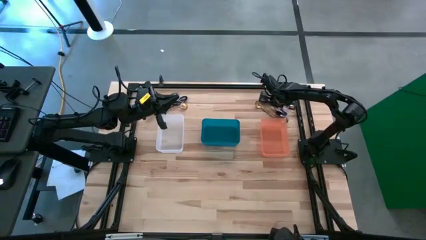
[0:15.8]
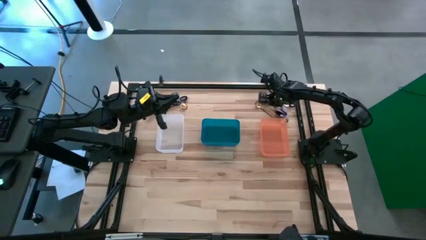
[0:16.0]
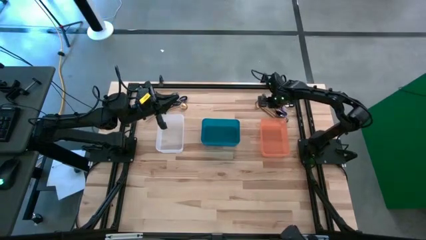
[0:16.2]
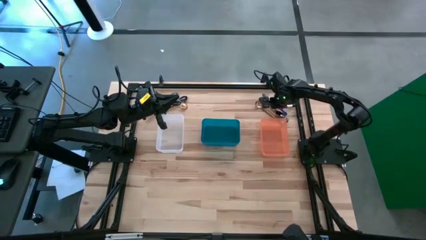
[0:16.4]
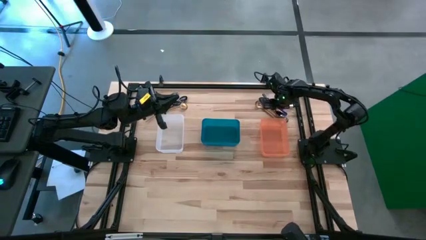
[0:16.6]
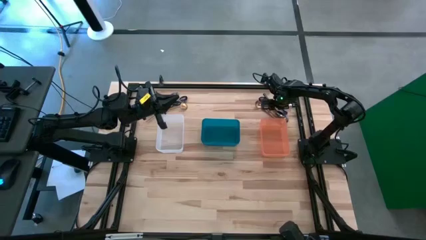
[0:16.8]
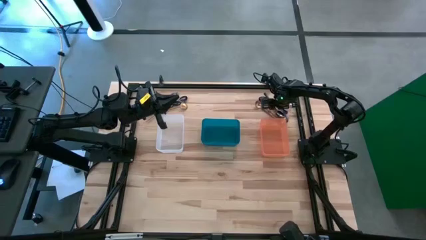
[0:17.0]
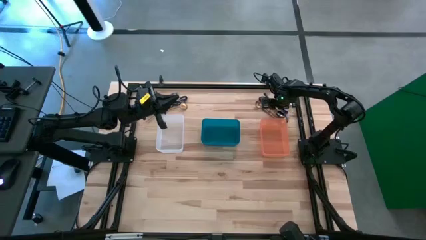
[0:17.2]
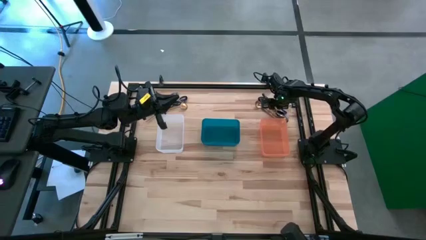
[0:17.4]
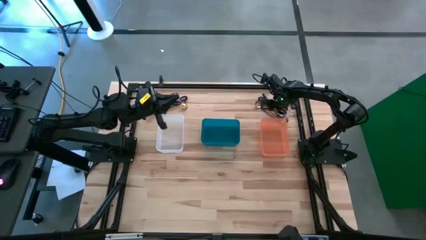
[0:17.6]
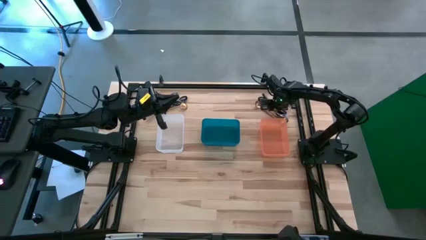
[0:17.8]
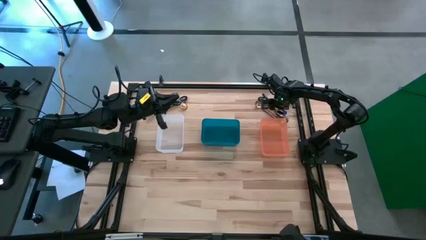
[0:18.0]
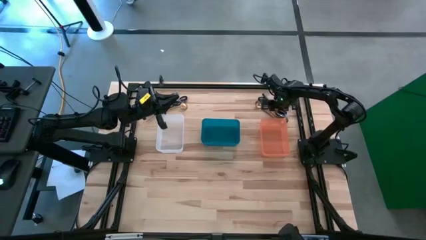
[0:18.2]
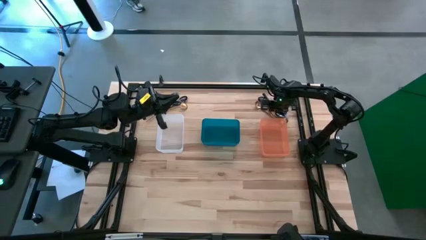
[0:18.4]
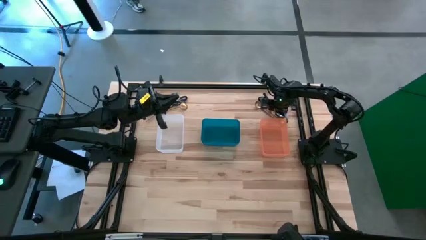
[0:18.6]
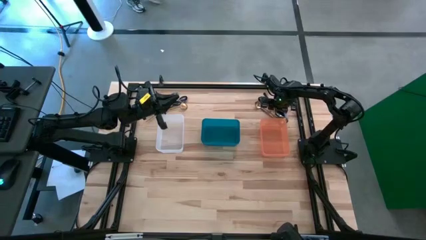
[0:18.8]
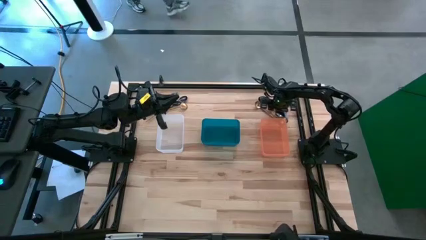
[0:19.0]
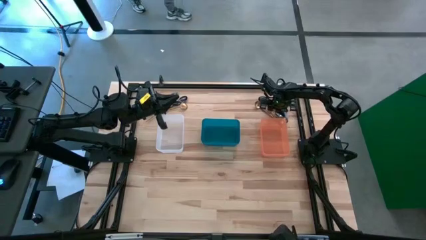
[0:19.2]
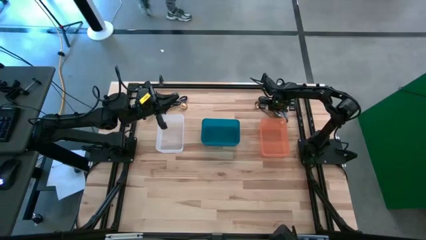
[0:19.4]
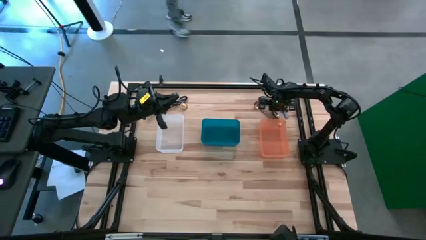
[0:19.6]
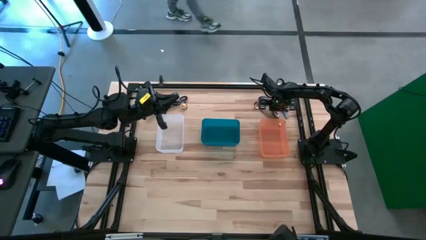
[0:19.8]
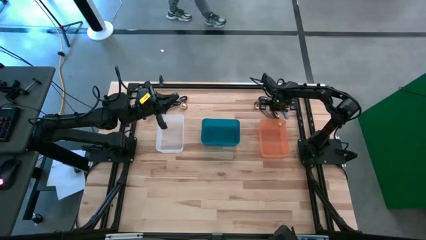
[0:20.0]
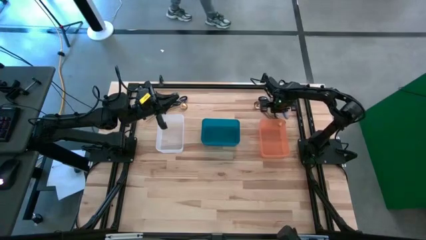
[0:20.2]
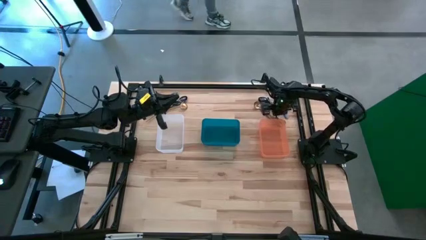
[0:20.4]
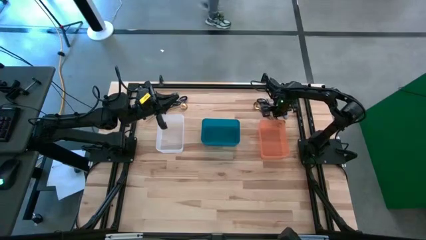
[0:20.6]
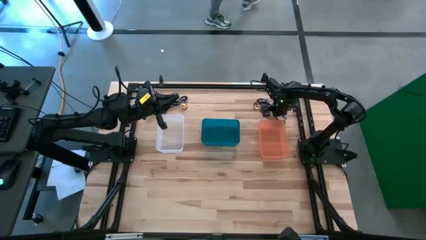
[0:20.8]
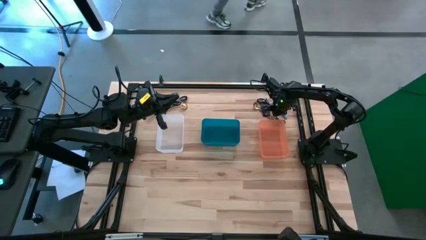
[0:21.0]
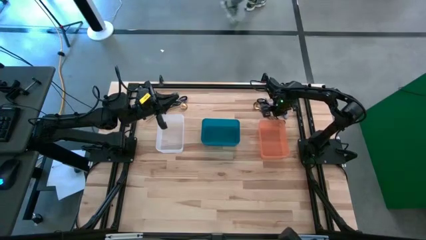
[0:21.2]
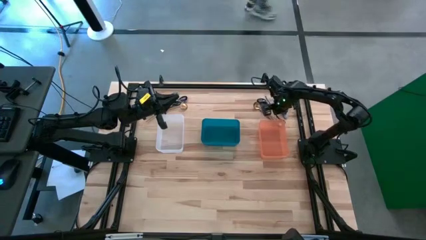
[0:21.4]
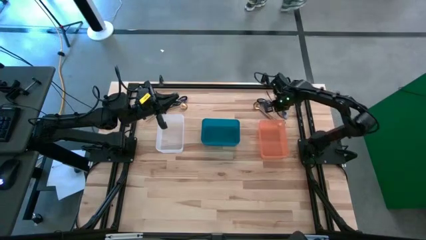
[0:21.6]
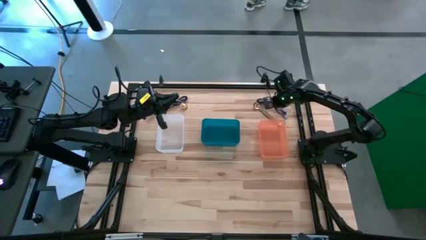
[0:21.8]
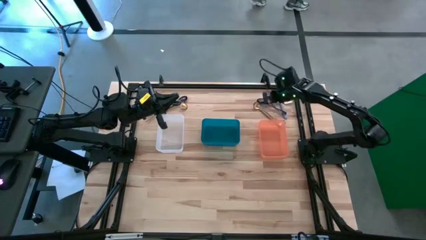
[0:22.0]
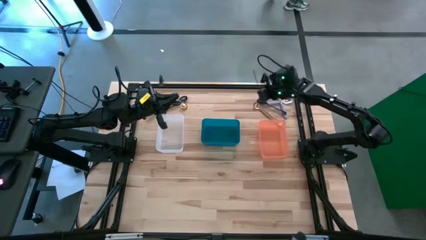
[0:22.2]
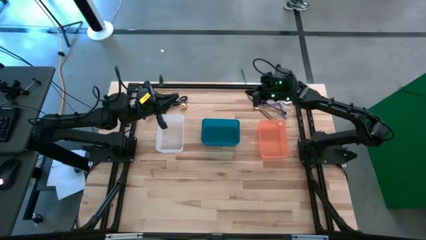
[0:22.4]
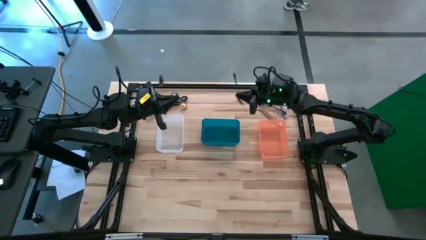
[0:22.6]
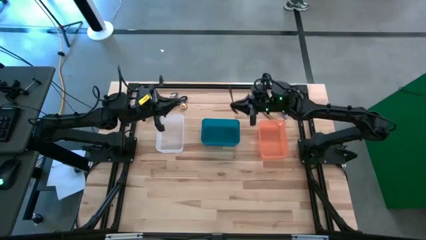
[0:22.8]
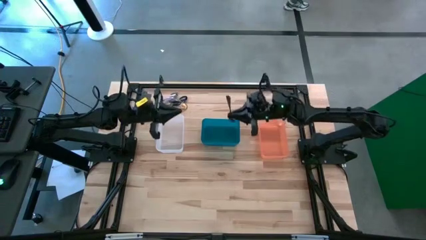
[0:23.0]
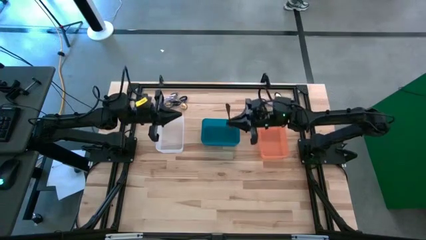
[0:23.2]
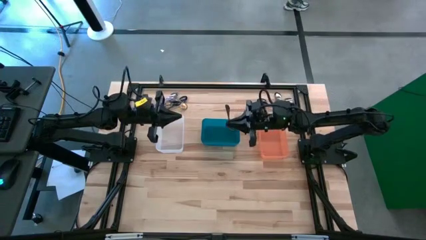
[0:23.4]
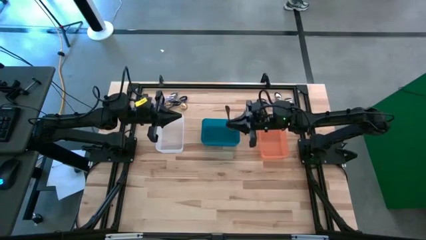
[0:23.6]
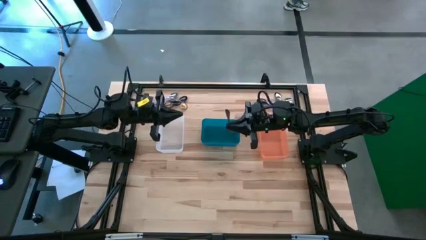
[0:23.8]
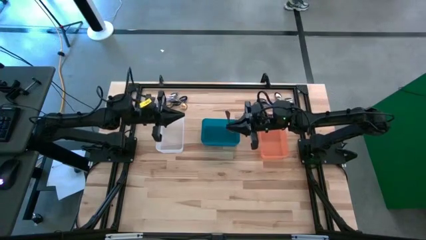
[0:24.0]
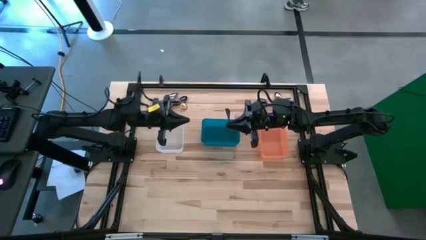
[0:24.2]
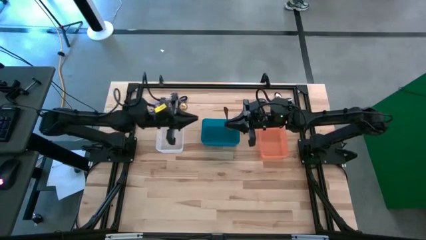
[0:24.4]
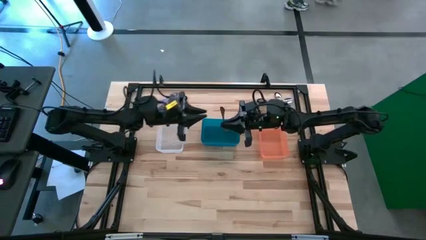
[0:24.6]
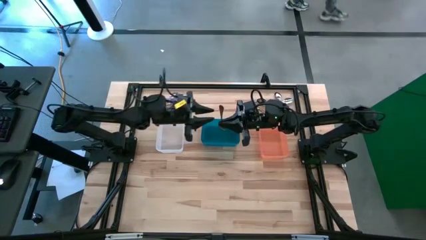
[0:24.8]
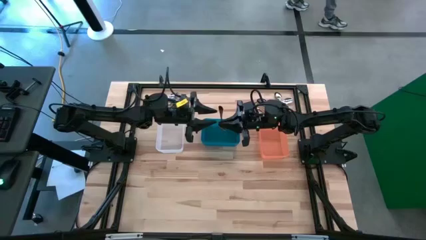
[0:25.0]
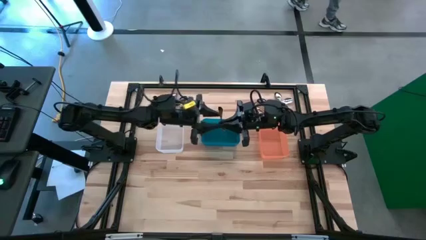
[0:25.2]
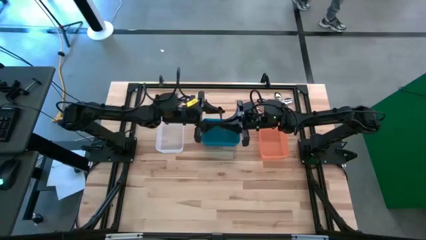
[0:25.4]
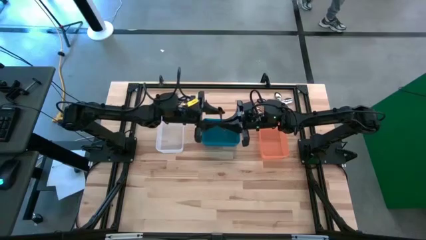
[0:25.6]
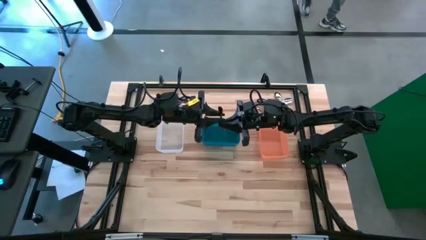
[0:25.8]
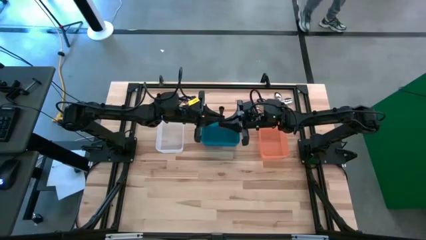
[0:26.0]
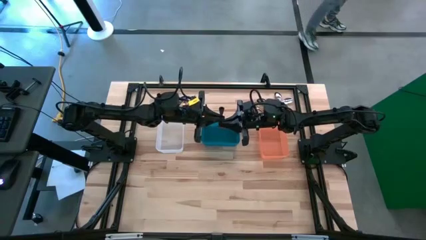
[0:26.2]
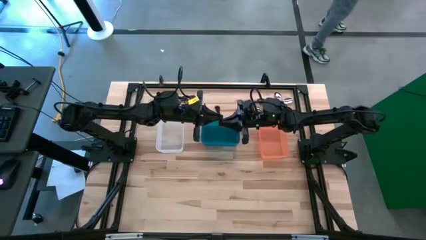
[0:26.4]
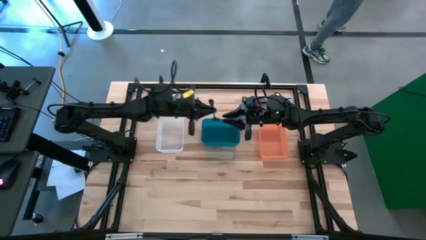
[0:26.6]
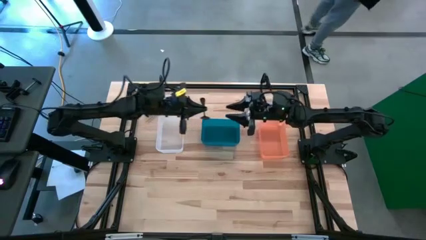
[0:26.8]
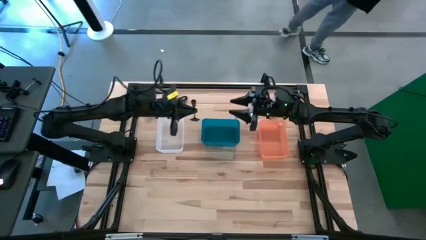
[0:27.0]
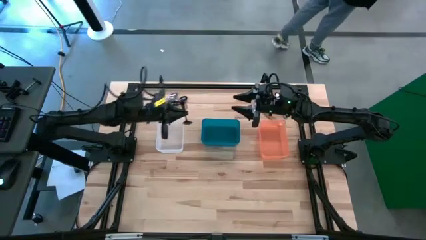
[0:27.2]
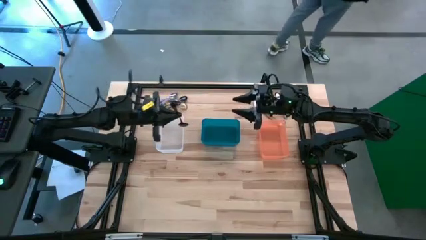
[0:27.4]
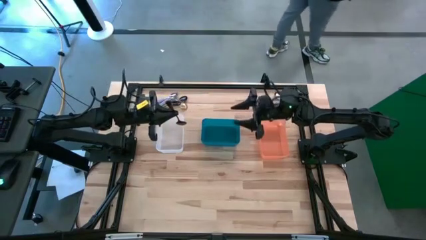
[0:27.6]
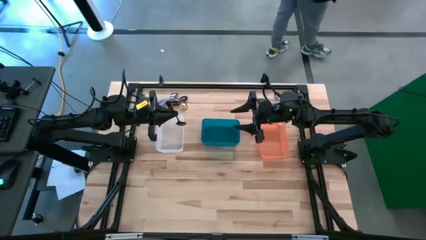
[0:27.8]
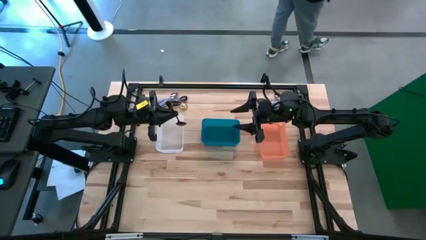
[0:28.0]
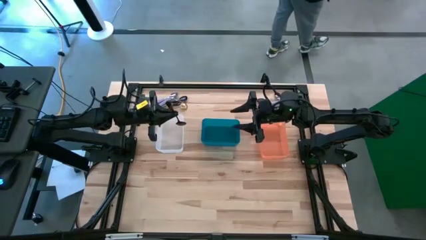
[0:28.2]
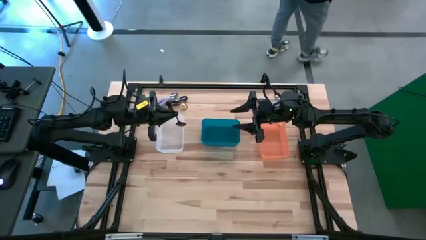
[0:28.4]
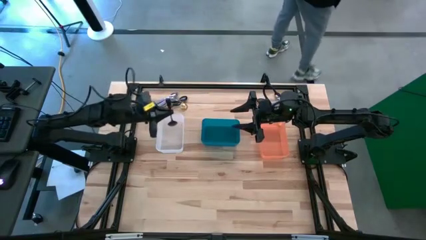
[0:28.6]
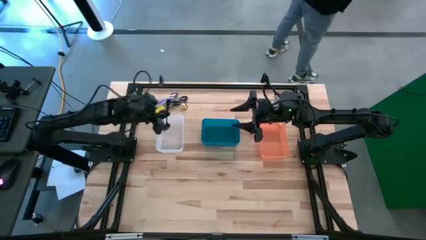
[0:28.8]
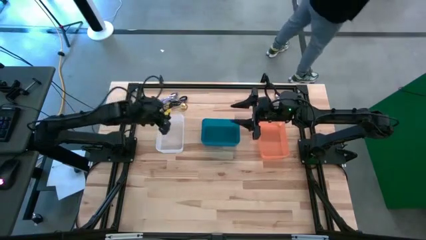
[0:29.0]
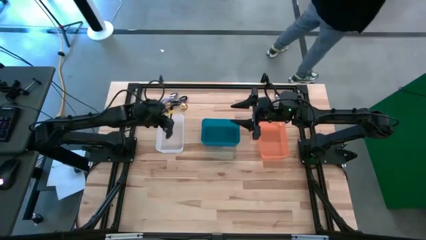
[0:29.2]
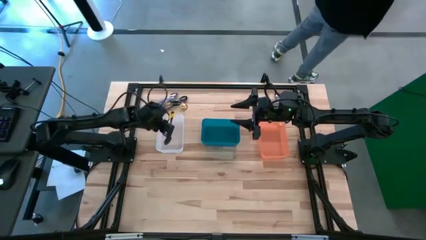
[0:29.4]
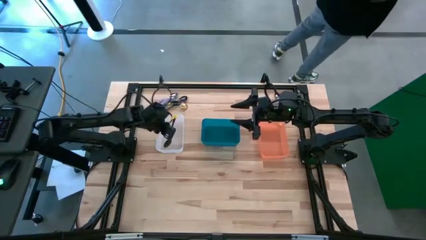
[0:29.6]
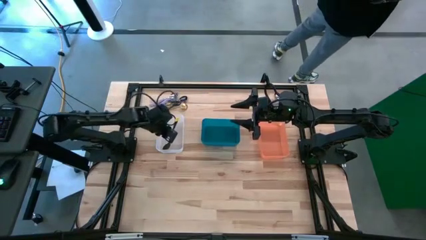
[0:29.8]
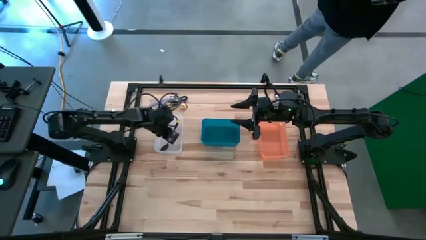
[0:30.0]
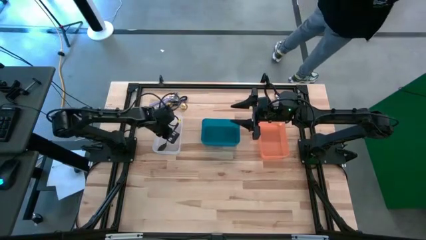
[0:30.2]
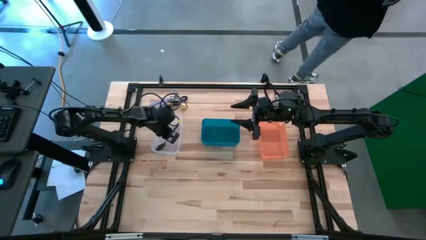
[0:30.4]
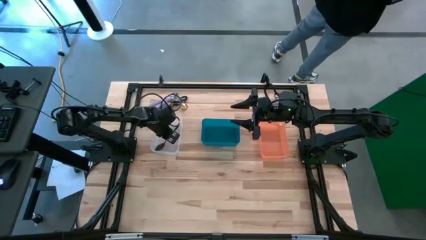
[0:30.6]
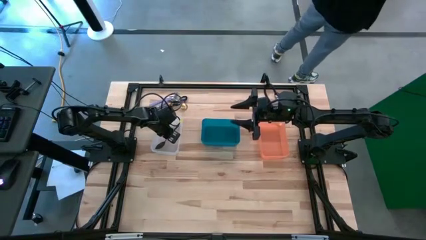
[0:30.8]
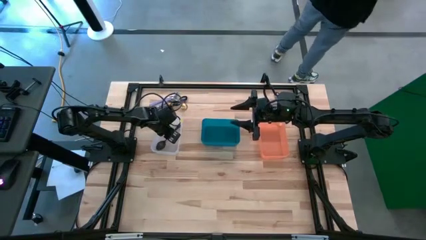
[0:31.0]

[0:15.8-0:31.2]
Task: Sort silverware by color (type)
Put the black spoon into the transparent bin
